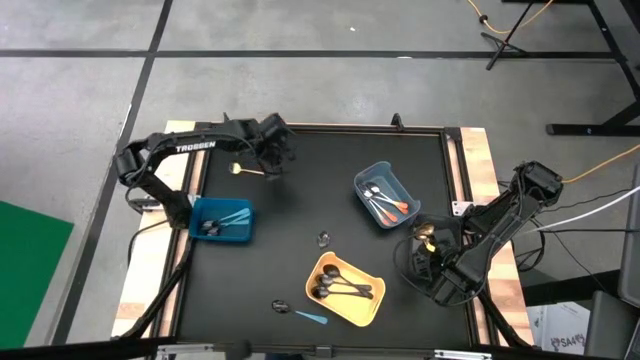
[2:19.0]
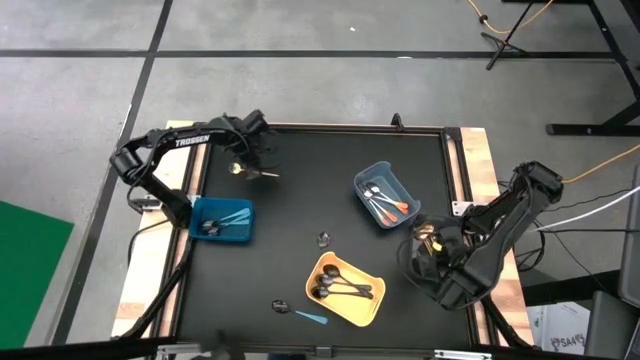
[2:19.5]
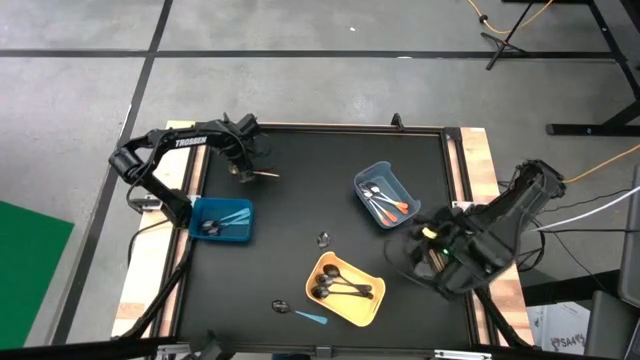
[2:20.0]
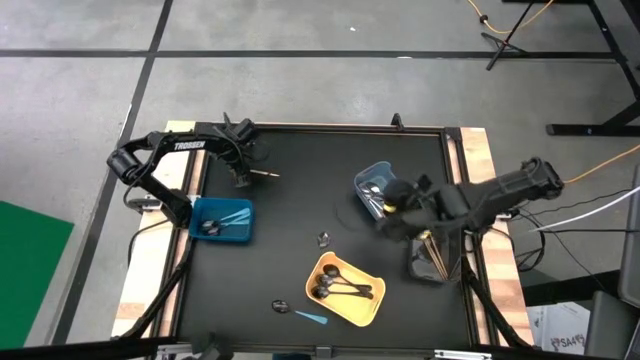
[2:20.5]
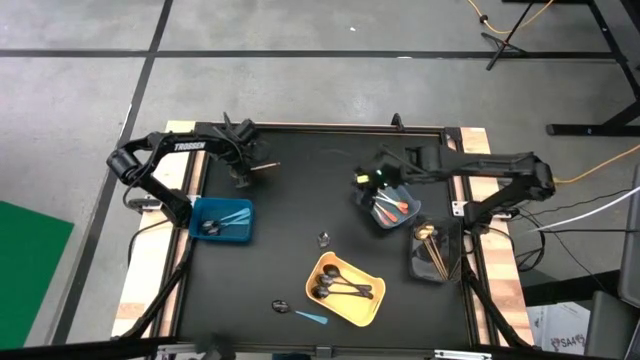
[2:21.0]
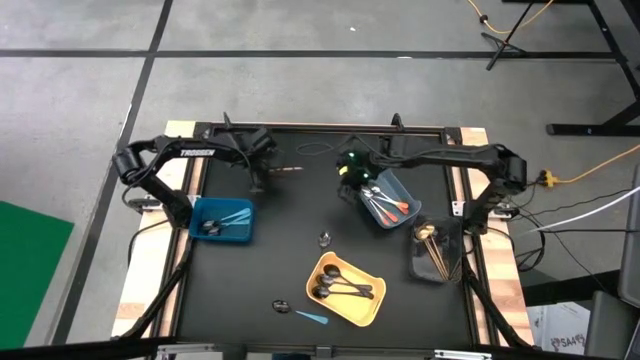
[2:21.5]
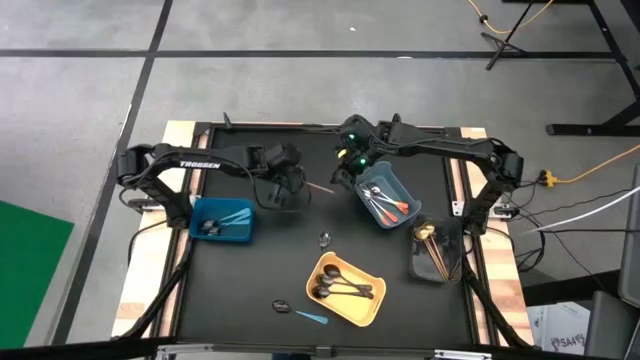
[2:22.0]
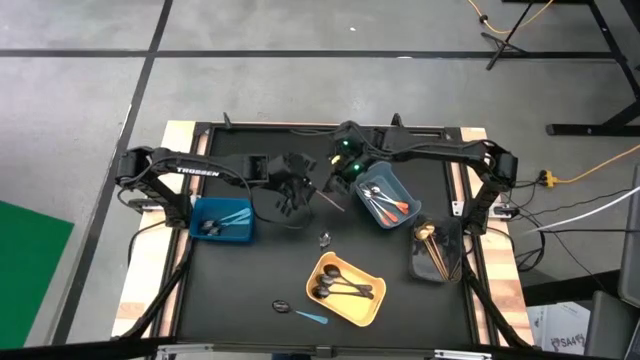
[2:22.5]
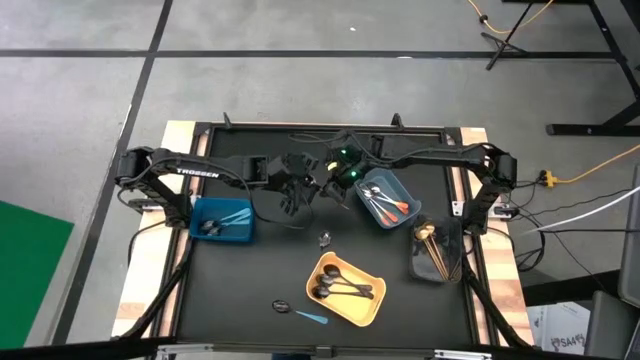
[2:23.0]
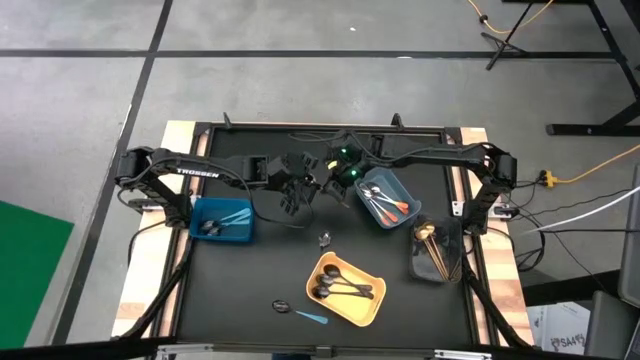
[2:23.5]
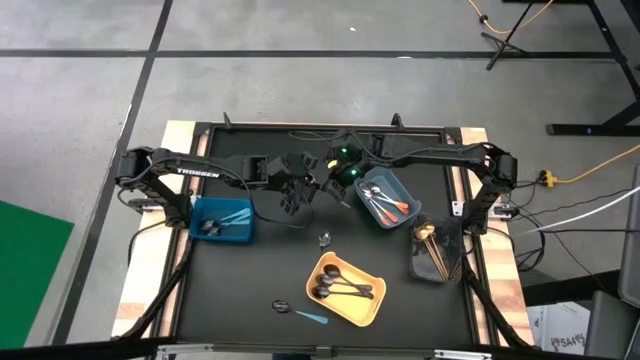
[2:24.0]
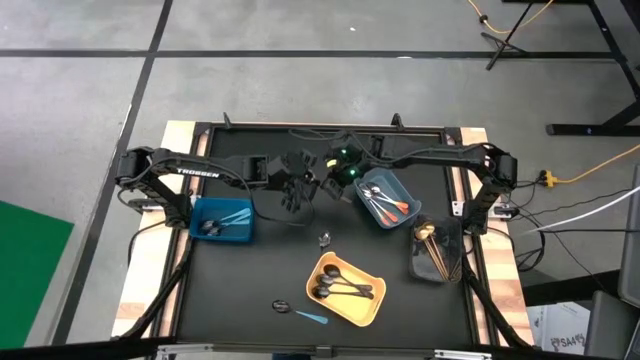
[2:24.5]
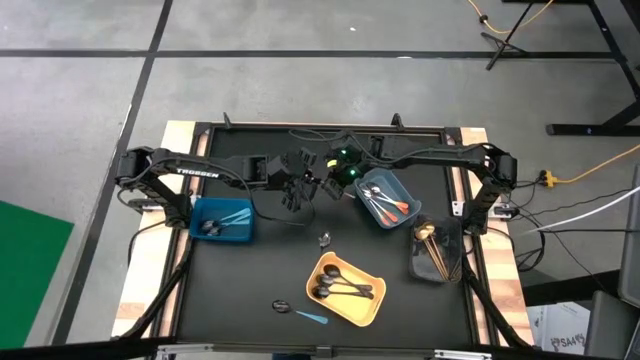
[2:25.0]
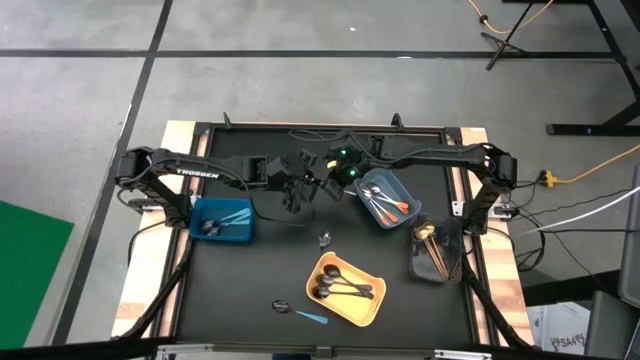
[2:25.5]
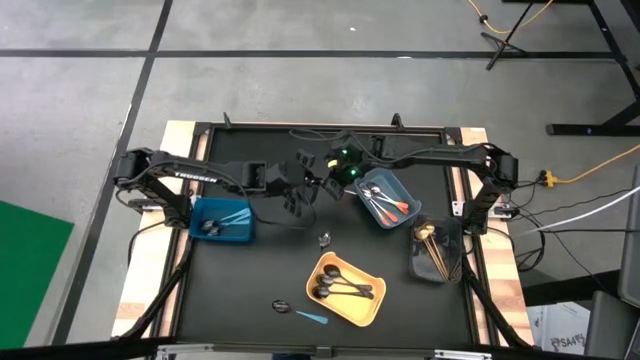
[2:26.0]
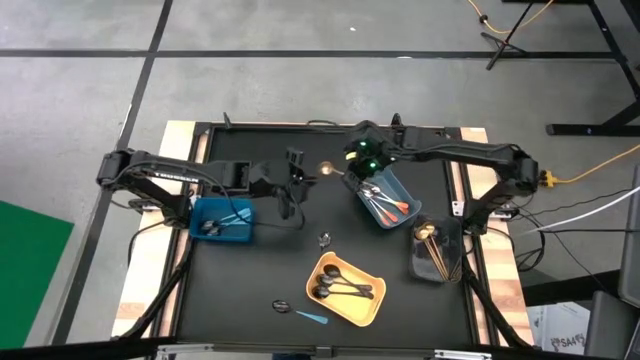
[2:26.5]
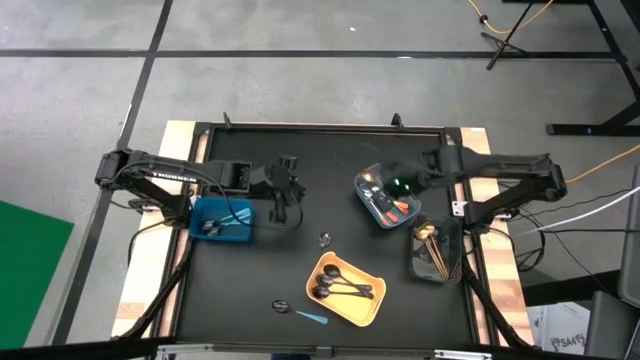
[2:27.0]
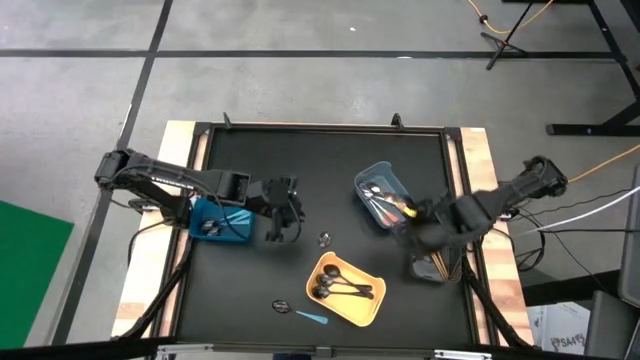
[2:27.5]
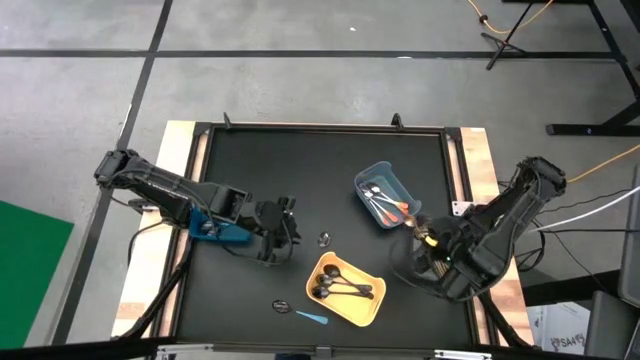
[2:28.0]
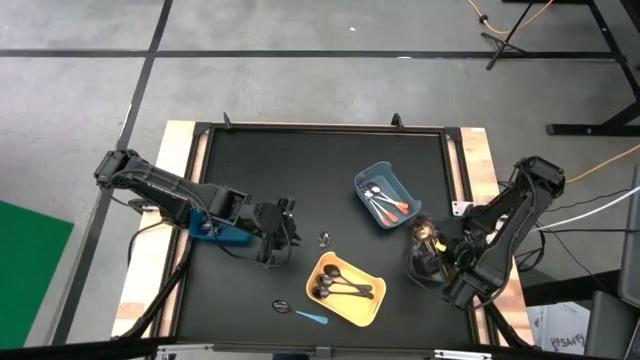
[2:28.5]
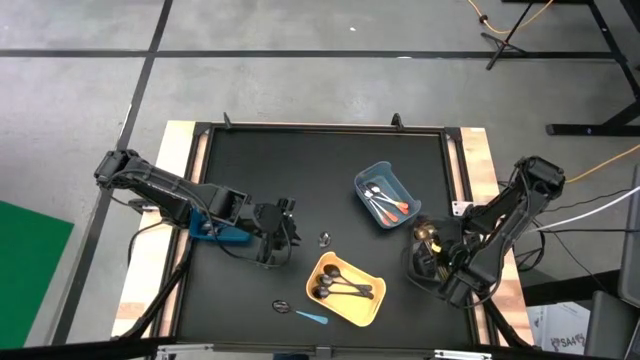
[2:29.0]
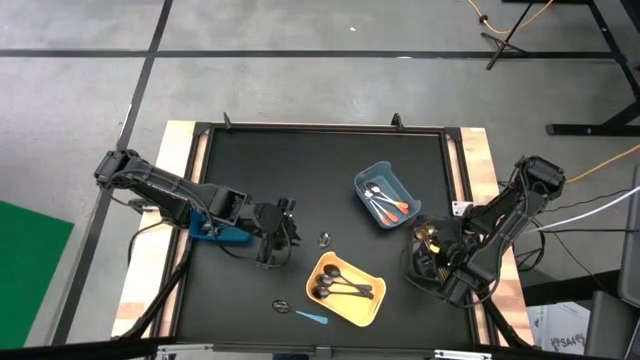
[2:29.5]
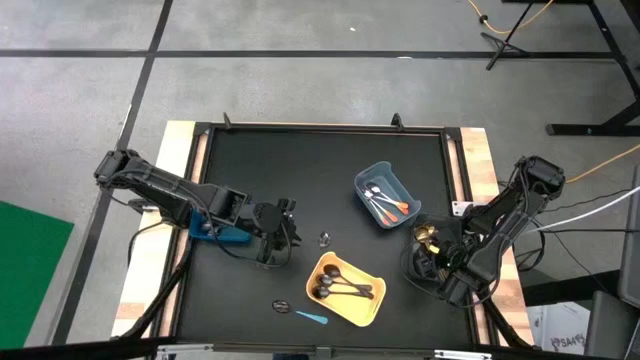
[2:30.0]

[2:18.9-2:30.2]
Task: Sort silverware by color (type)
Put the gold spoon into the black bin

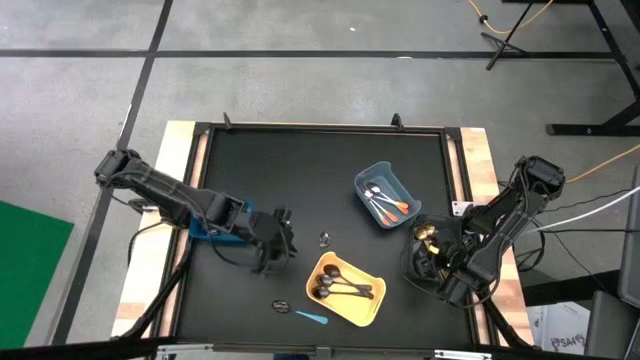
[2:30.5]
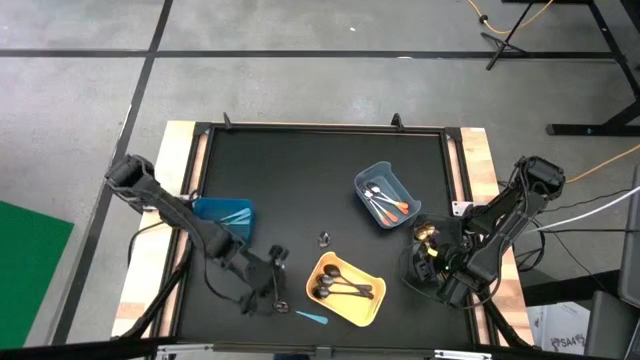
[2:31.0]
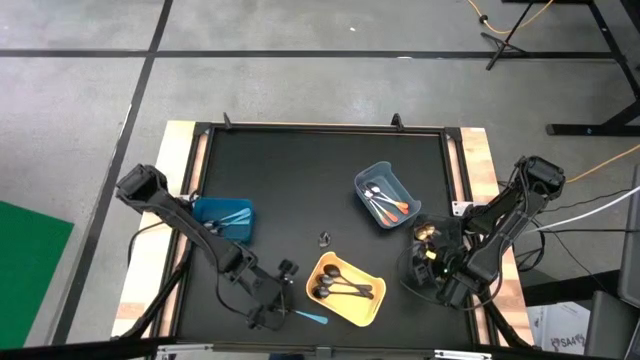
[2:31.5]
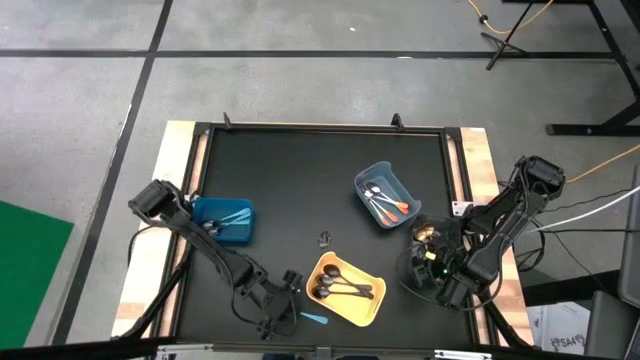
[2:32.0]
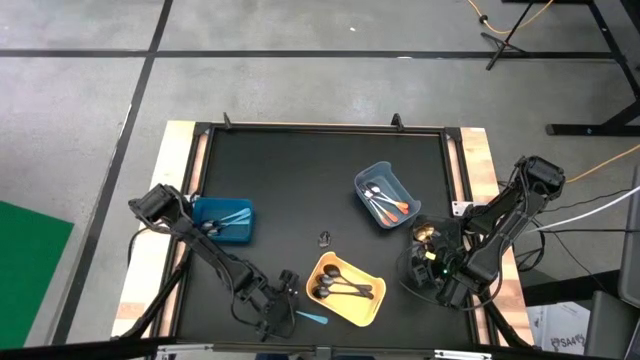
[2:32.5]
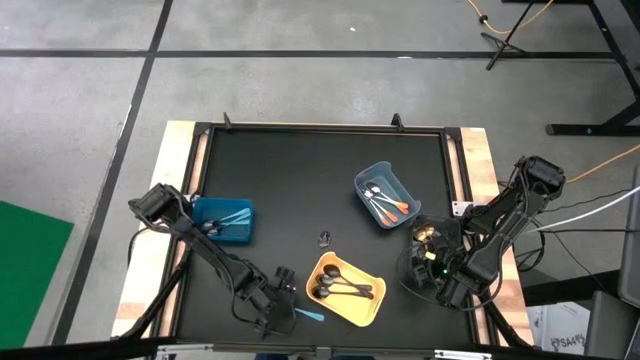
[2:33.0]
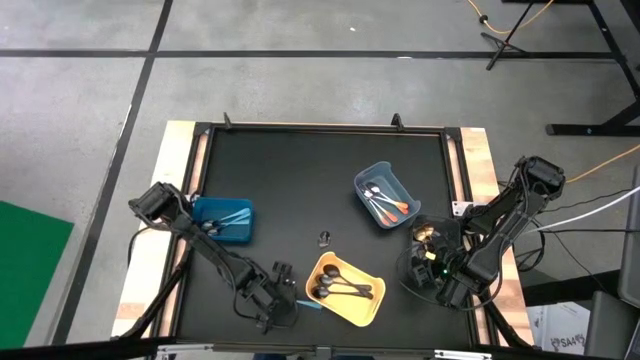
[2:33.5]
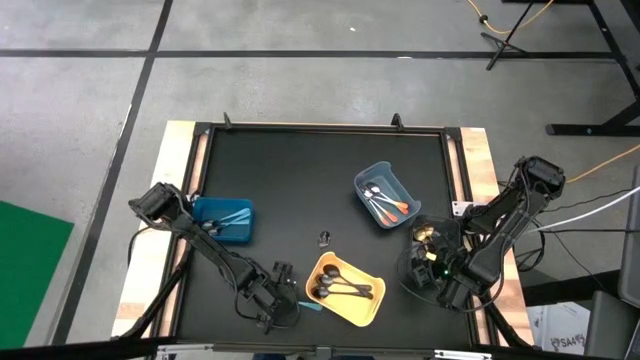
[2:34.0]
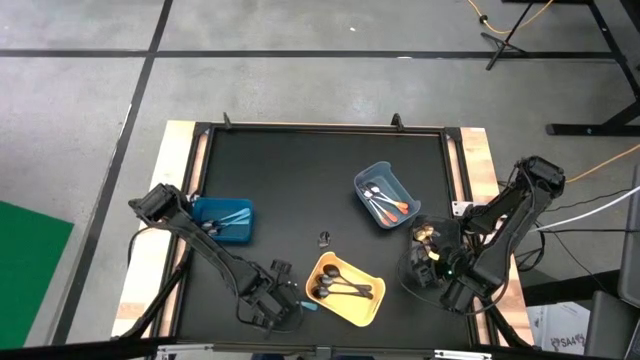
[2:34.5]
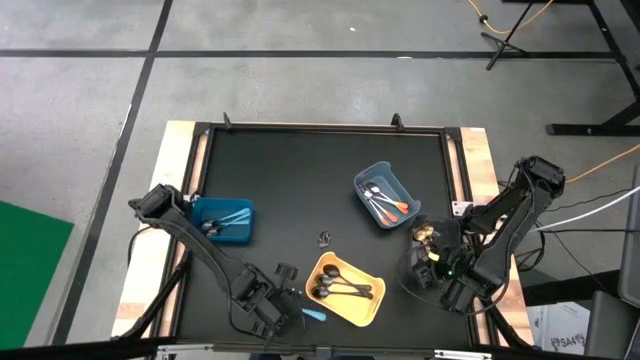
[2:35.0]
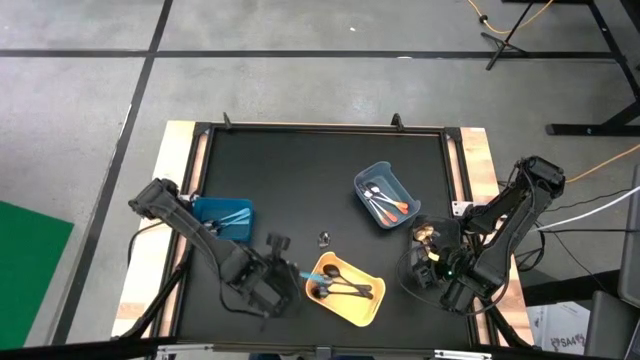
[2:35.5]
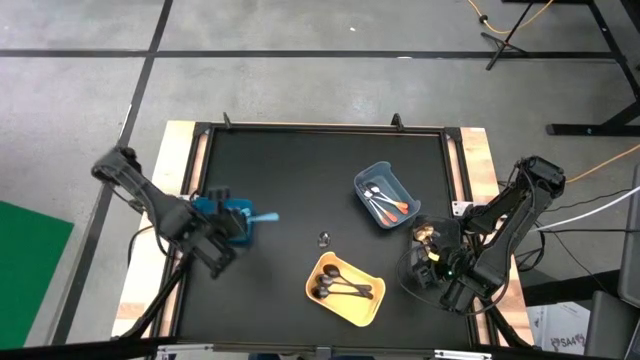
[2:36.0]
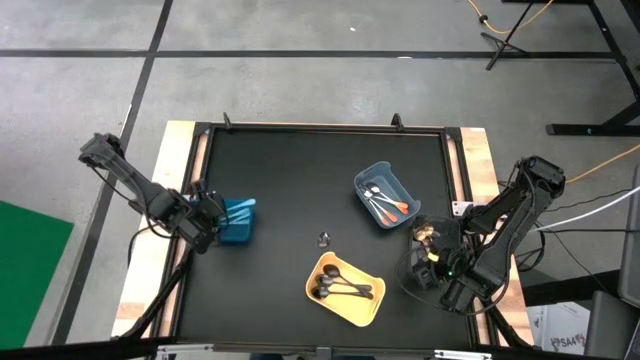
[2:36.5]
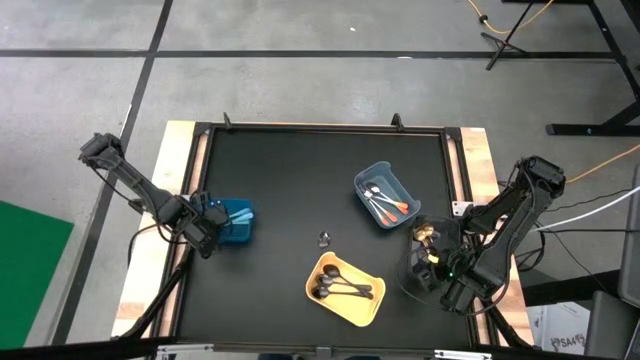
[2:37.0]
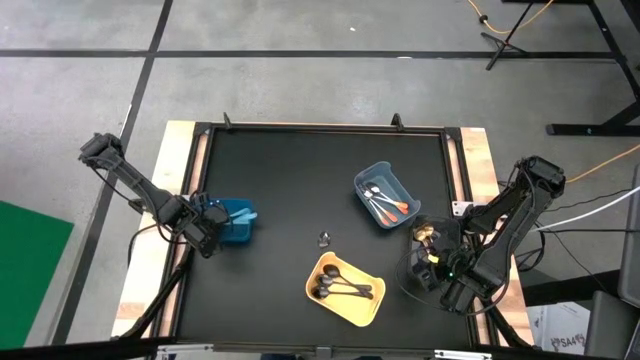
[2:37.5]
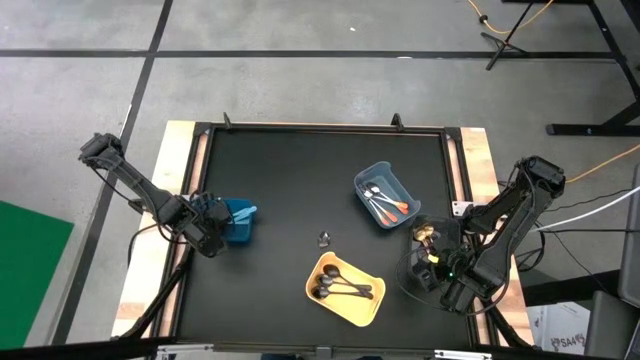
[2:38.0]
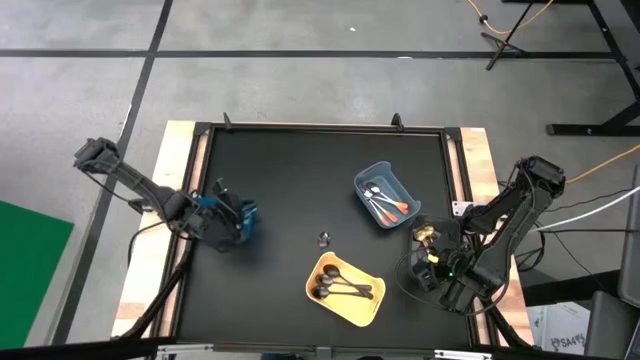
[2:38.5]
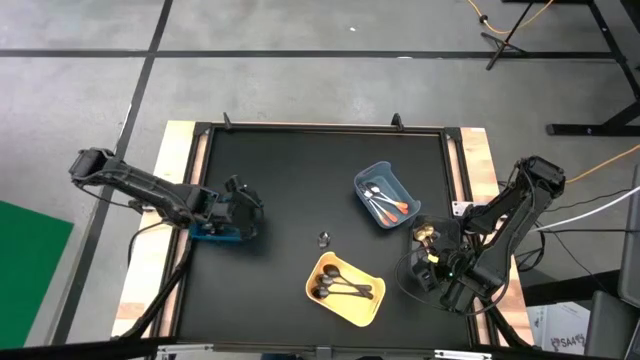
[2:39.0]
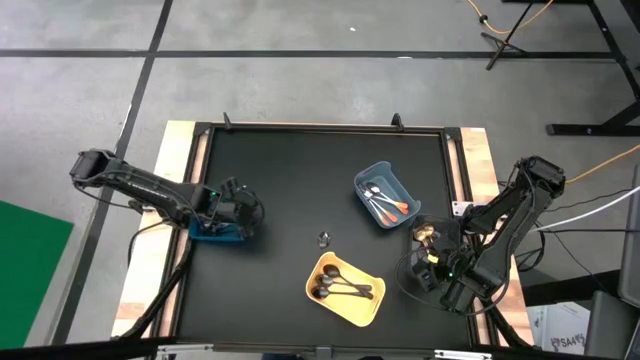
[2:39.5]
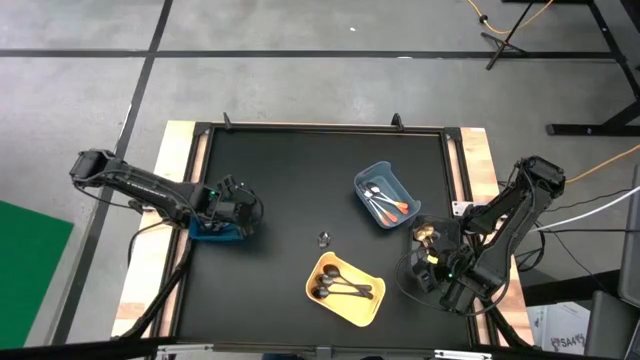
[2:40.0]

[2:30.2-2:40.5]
Put the blue spoon into the blue bin
